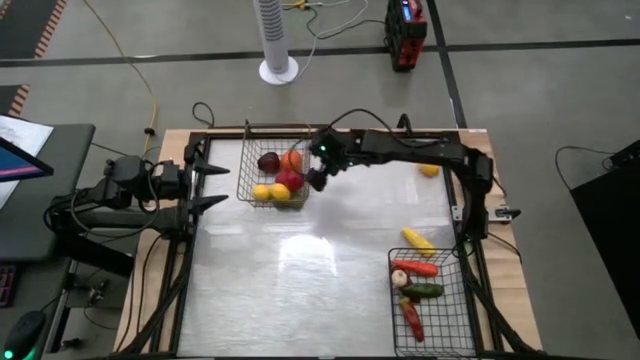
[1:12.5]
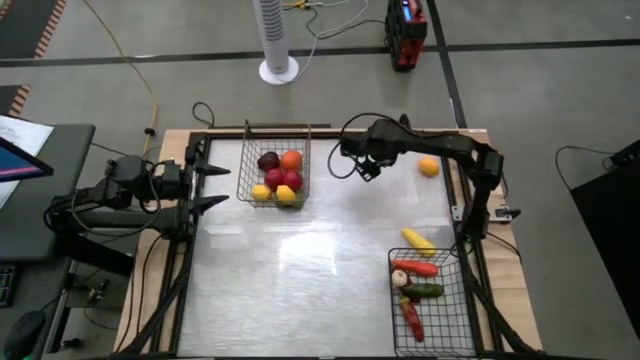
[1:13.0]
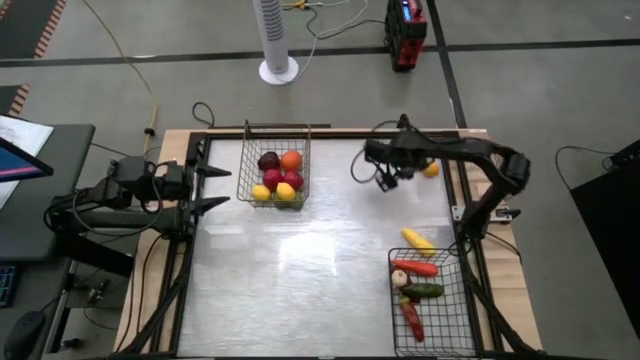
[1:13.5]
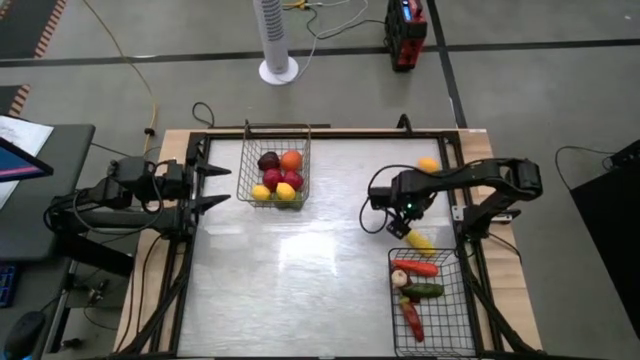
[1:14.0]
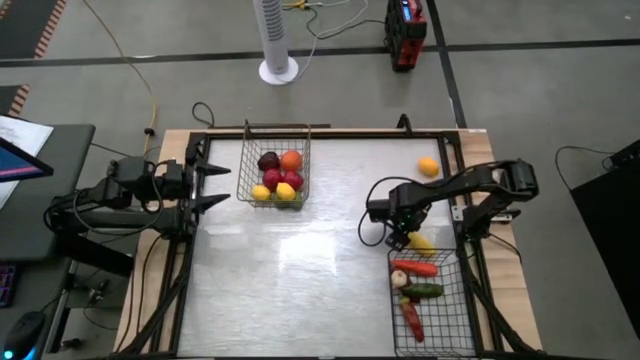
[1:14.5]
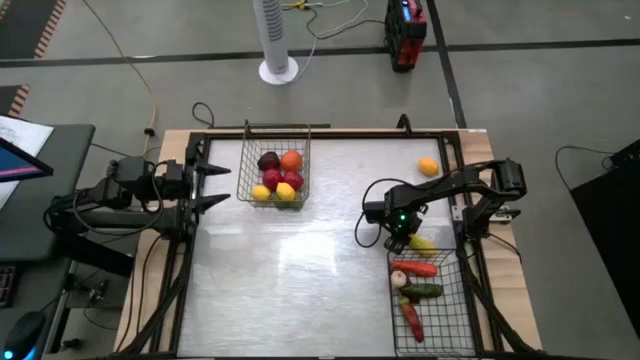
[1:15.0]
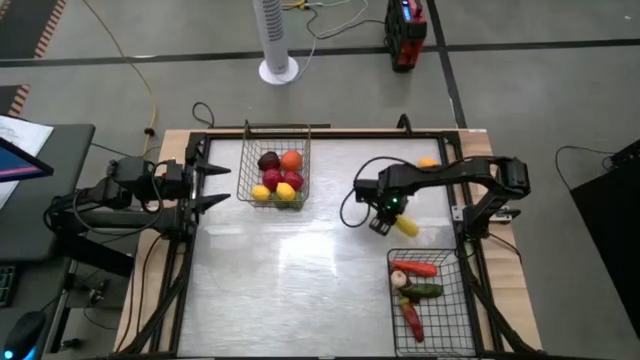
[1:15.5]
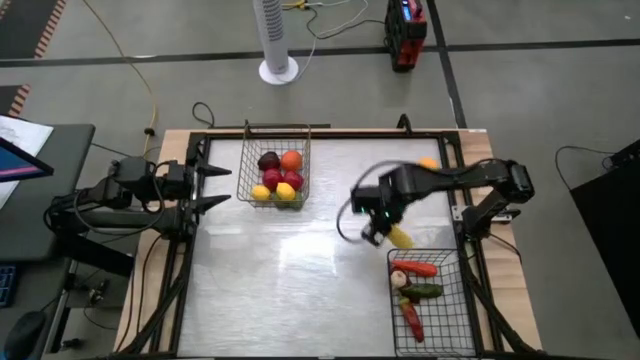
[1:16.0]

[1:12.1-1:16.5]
Task: Sort produce into baskets
Put the corn into the right wire basket

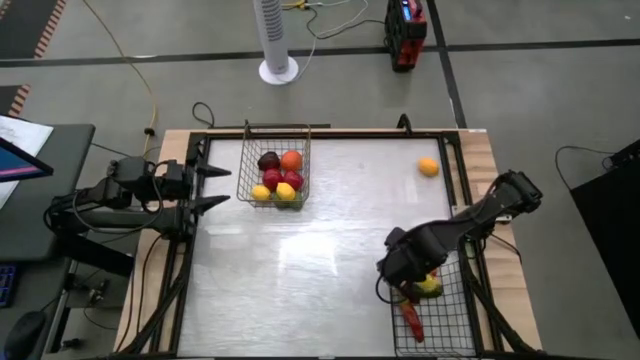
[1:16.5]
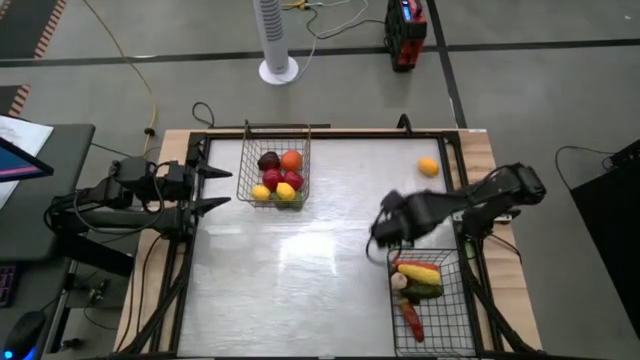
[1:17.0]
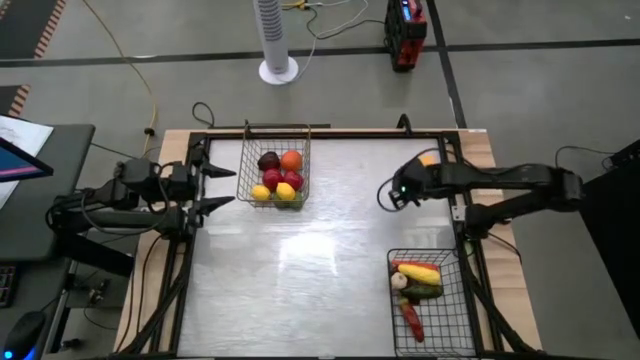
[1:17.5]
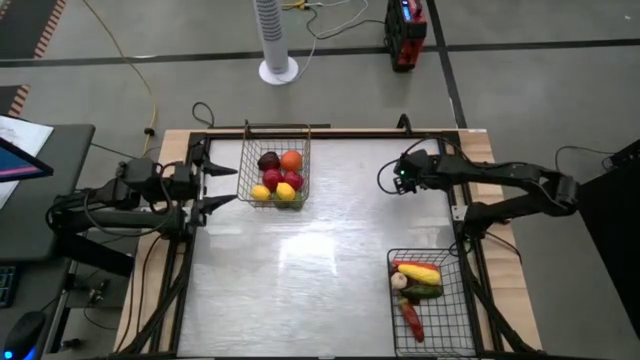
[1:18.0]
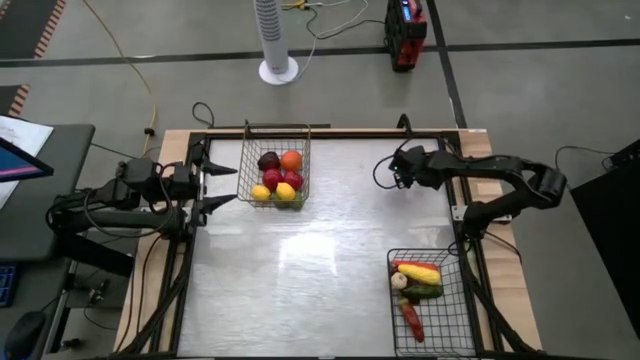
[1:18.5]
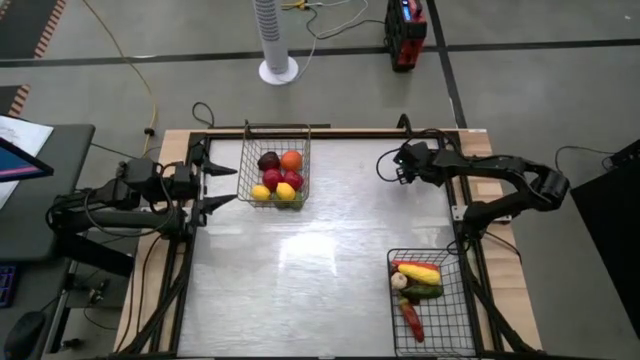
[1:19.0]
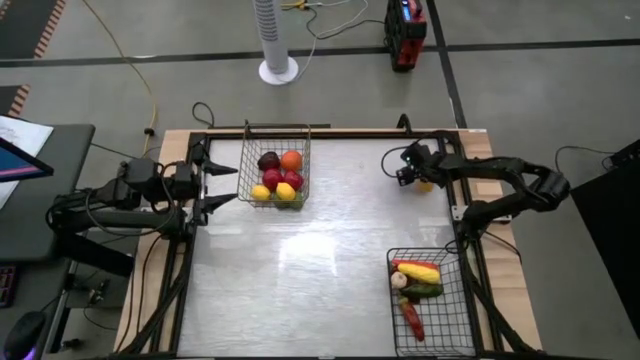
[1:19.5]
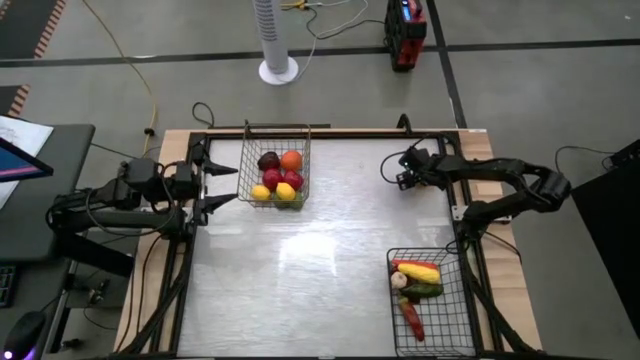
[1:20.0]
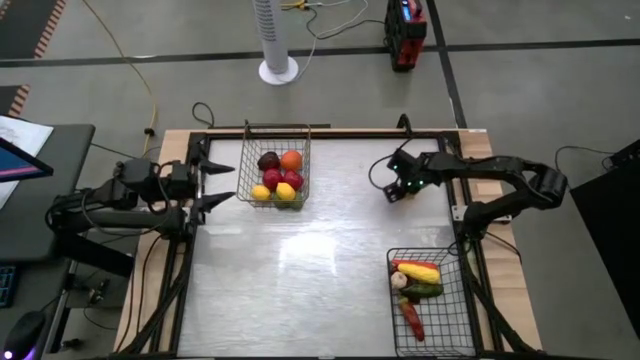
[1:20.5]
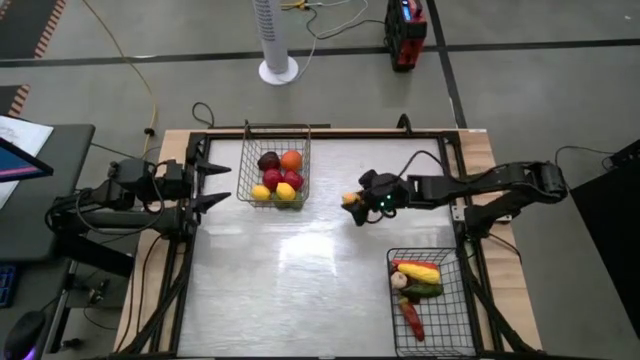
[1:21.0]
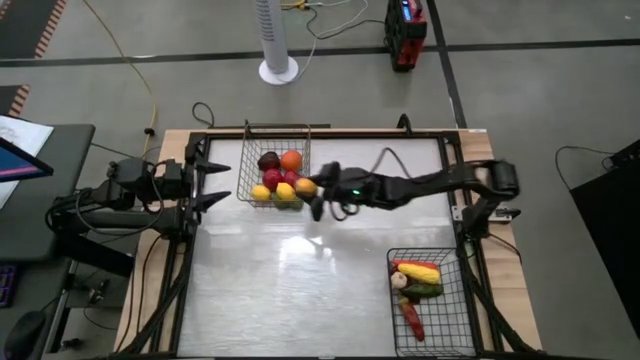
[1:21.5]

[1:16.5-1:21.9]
Put the lemon into the left wire basket

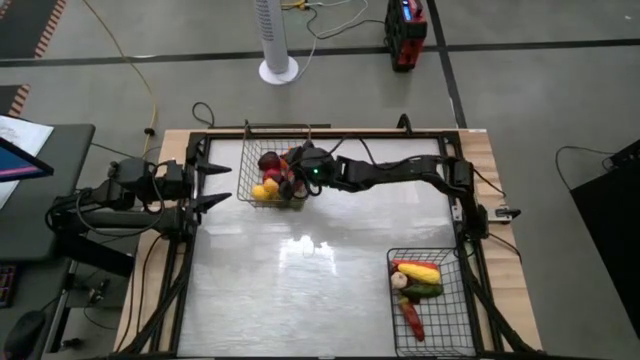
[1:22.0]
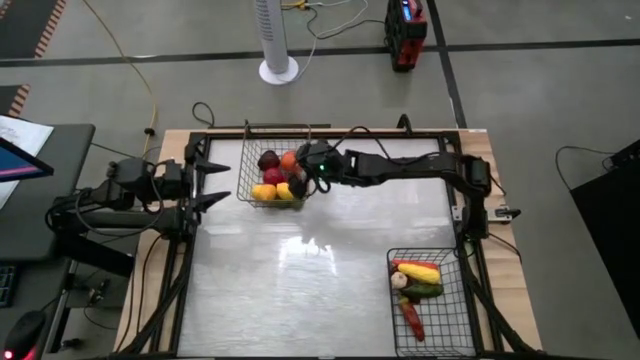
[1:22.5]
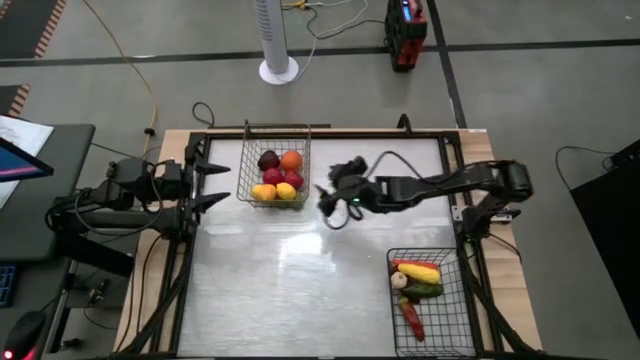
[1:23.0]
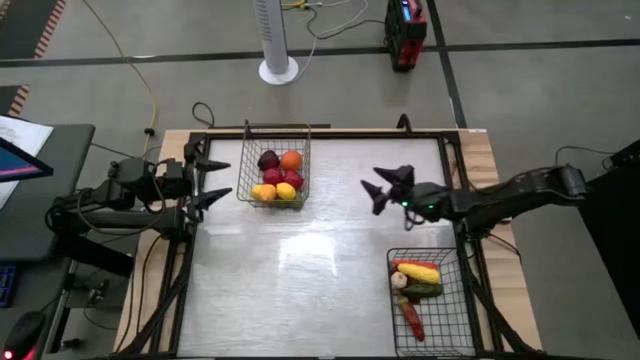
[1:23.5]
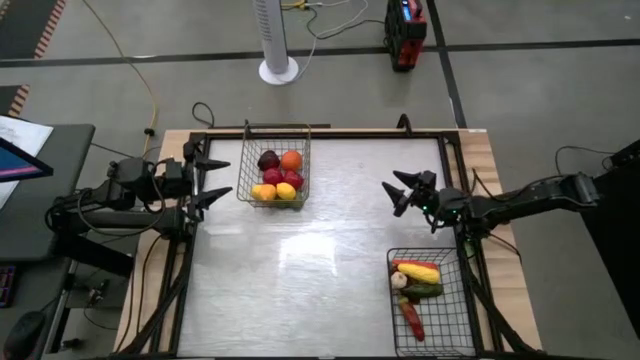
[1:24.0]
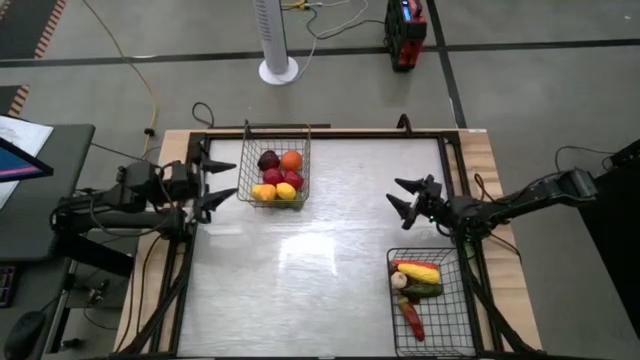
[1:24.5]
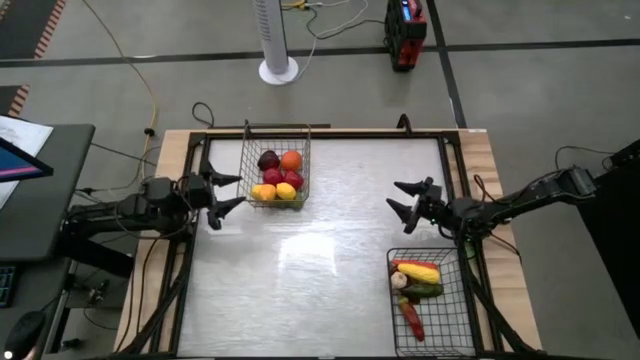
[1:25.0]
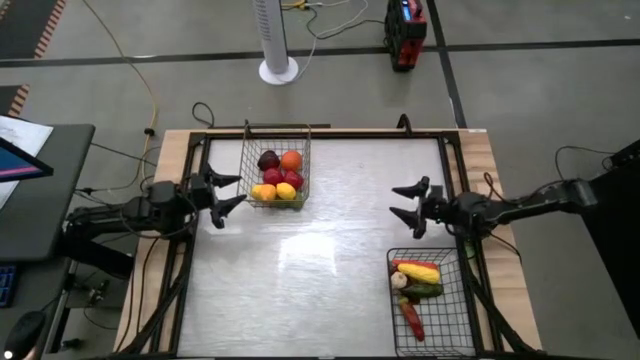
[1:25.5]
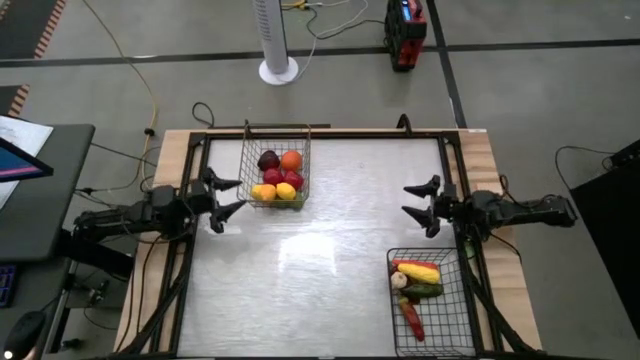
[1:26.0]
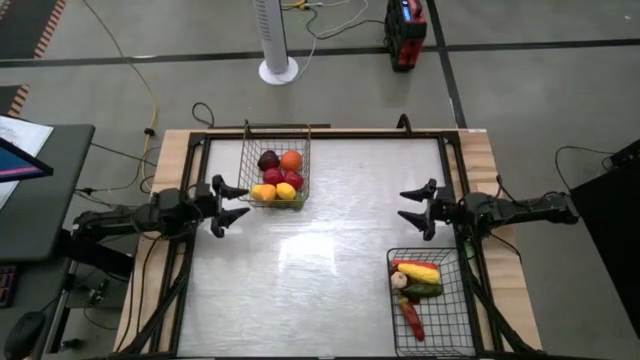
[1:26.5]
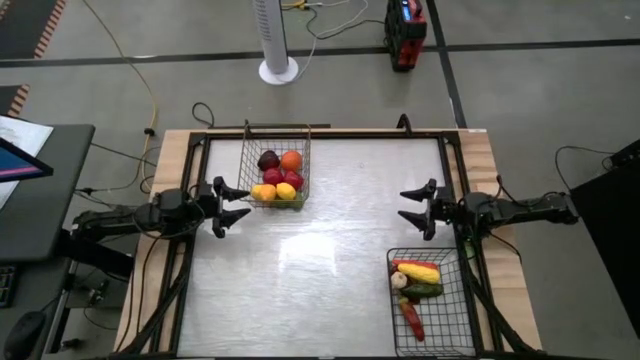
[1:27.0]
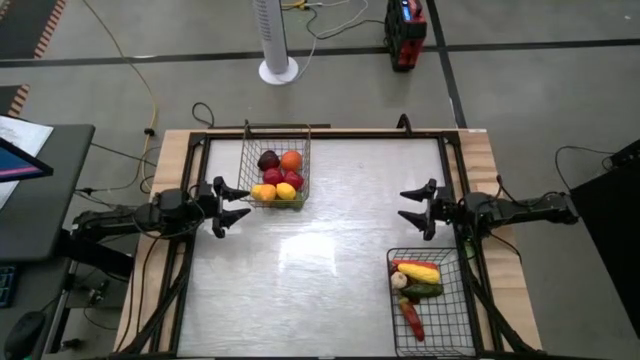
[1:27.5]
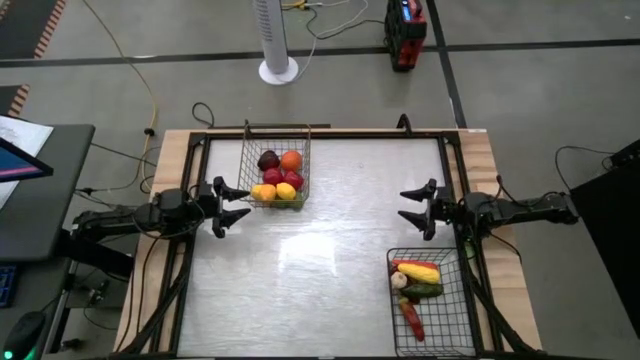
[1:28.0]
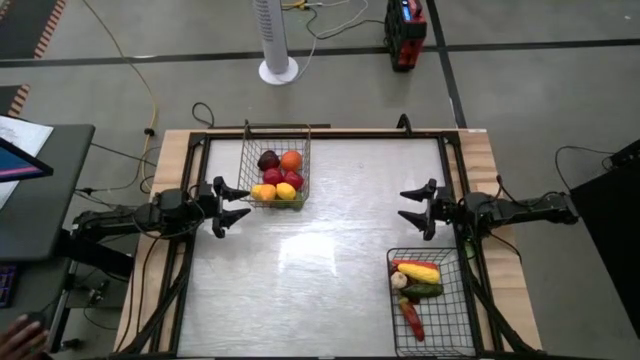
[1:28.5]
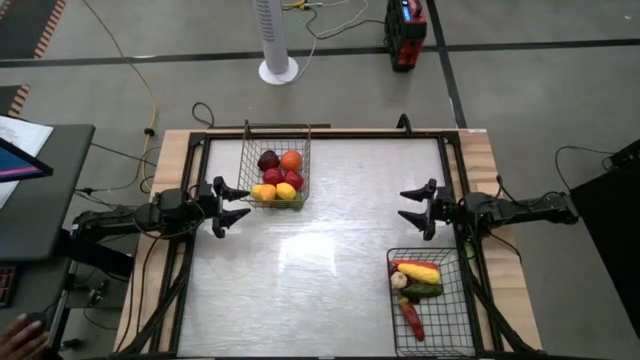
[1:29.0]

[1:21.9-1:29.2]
Return to Home Position

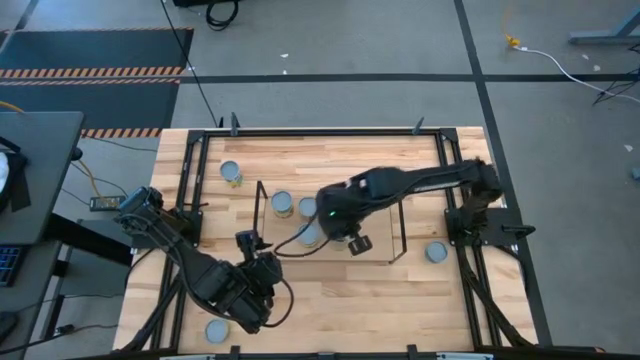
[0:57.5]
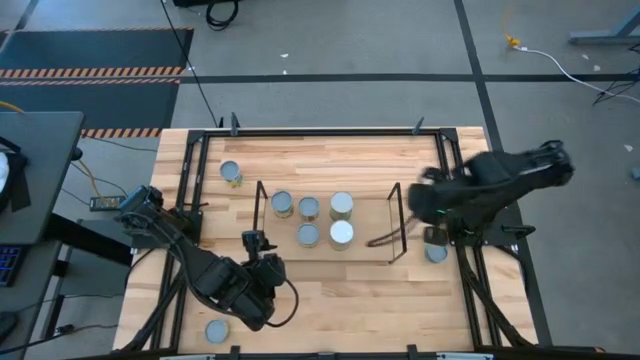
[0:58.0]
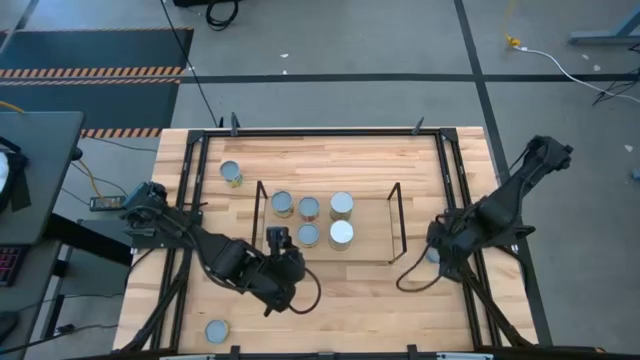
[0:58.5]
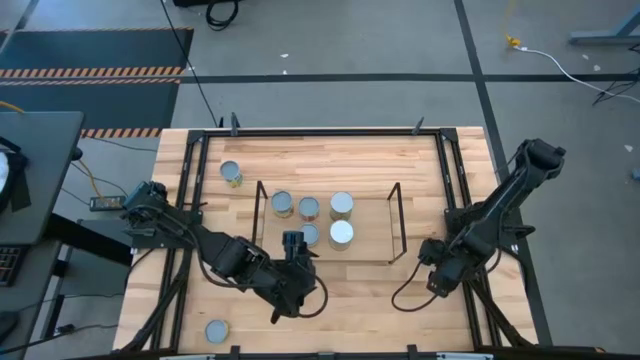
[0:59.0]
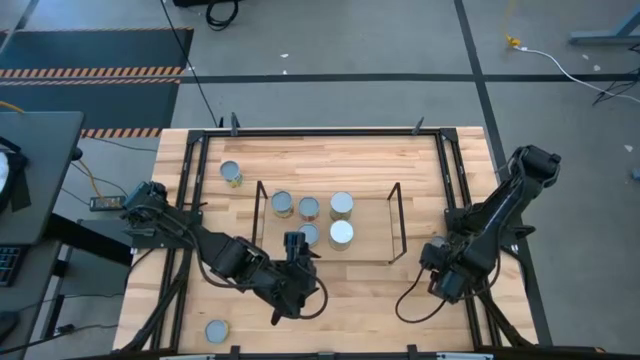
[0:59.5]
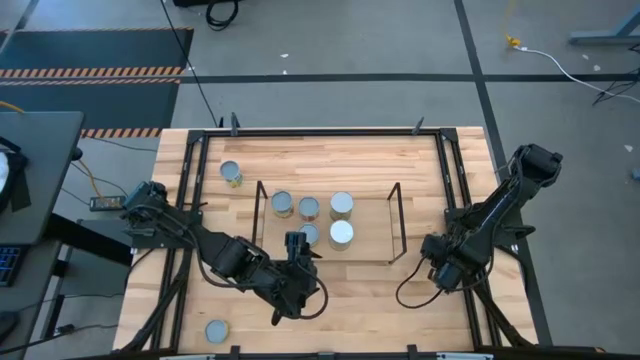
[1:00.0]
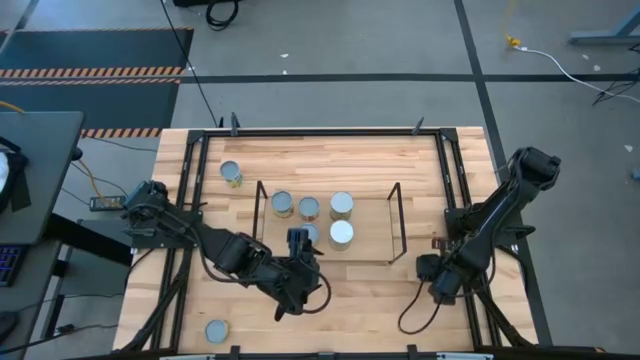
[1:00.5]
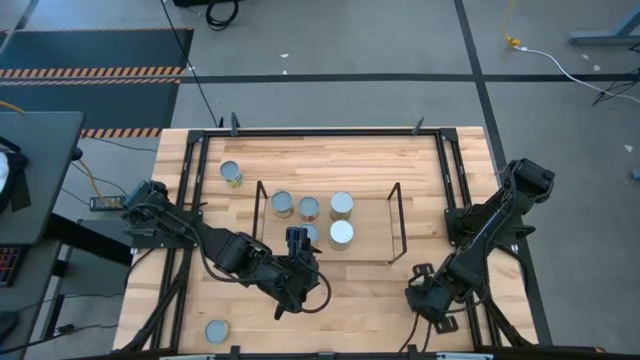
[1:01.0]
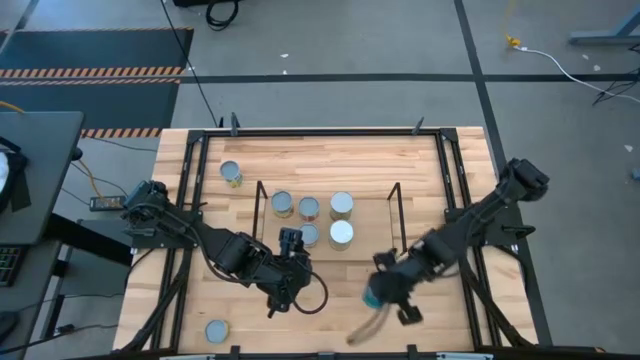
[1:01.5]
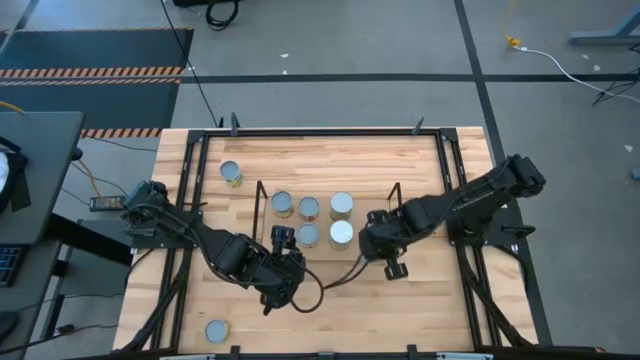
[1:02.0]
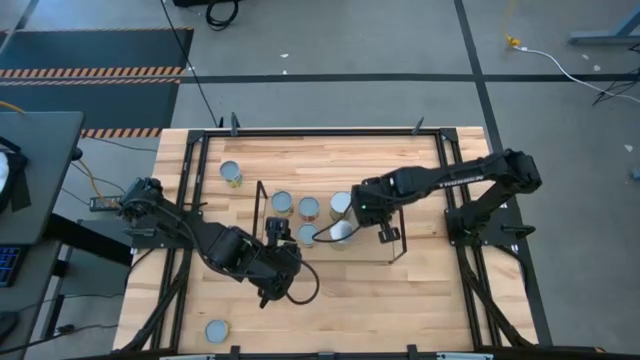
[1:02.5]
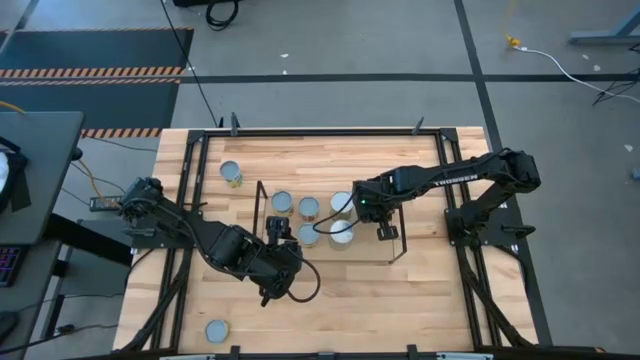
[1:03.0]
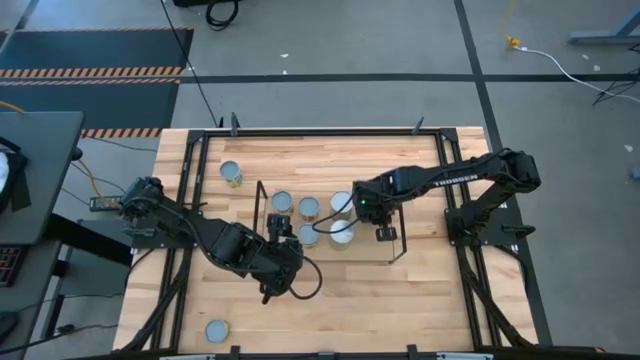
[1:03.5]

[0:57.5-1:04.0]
Task: Pick and place cans onto a shelf
Put the blue tuna can on the shelf
